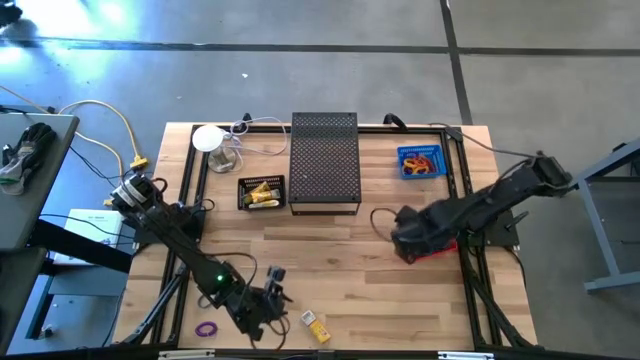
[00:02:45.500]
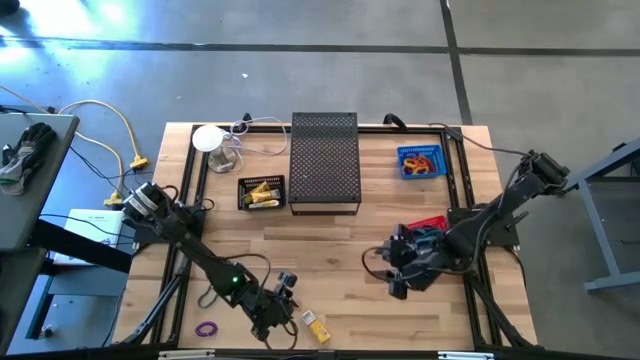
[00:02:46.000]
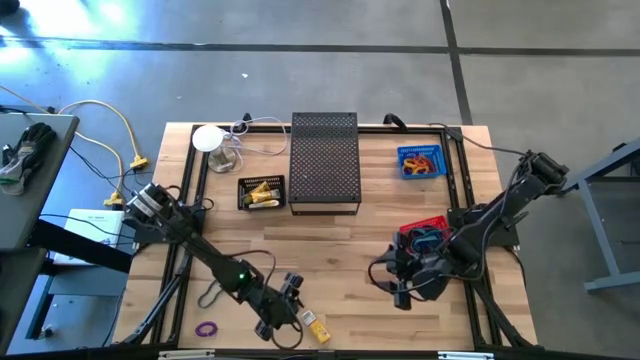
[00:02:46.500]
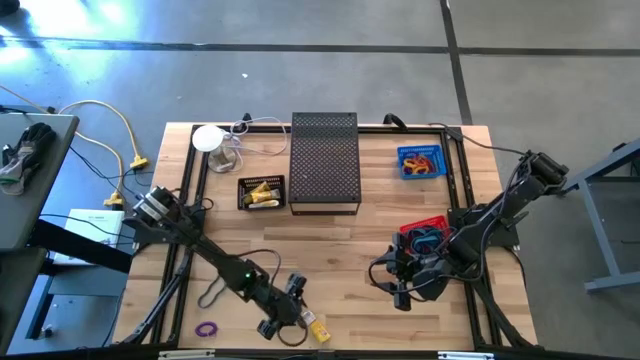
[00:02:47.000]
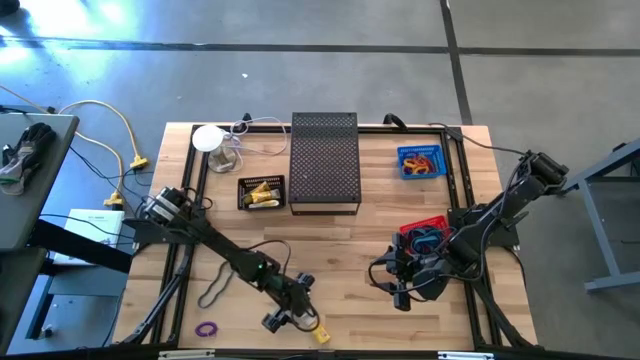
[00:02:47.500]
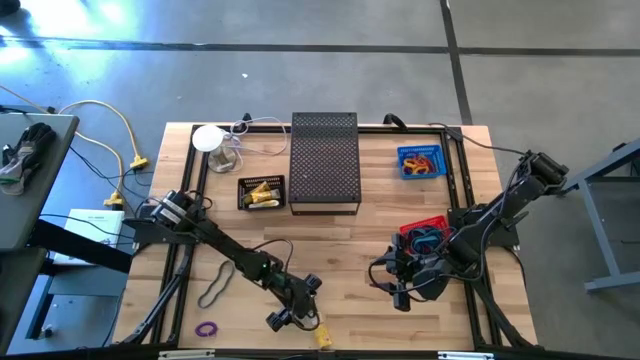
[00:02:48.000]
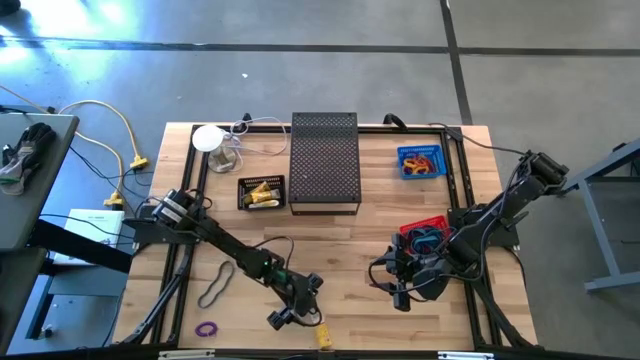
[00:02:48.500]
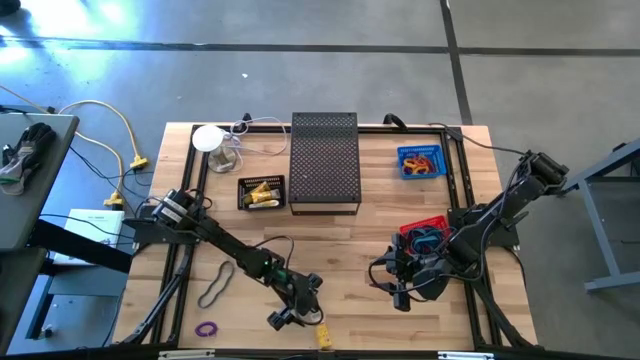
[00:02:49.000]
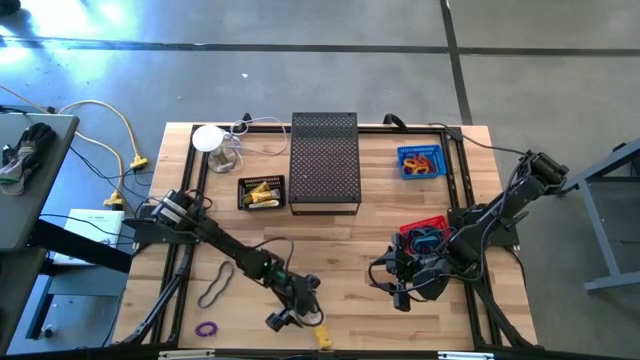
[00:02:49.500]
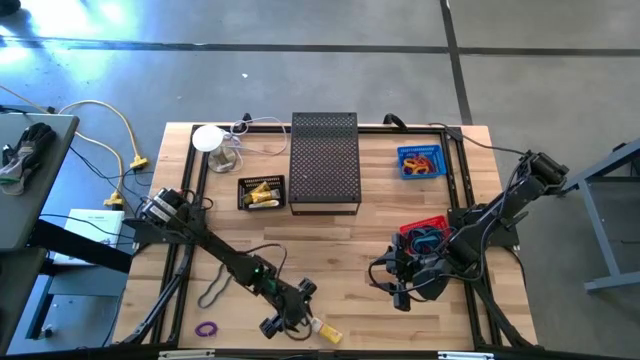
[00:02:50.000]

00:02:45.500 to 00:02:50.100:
Task: Pick & Place Office Desk Supplies
Put the yellow crayon box into the black bin

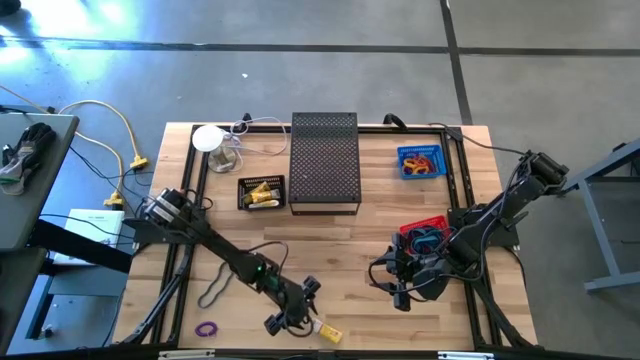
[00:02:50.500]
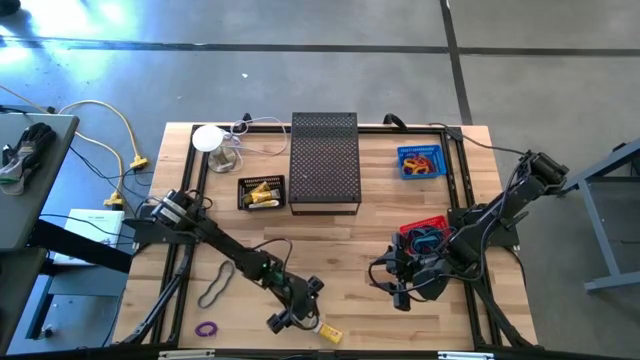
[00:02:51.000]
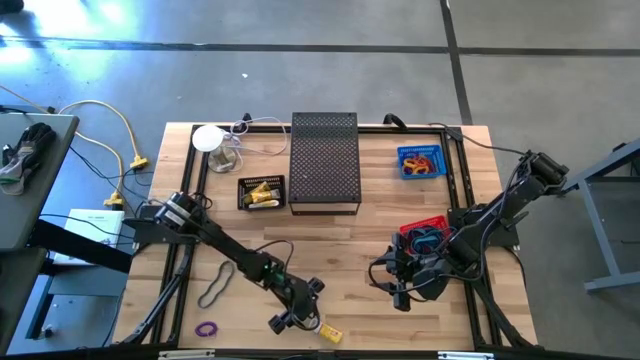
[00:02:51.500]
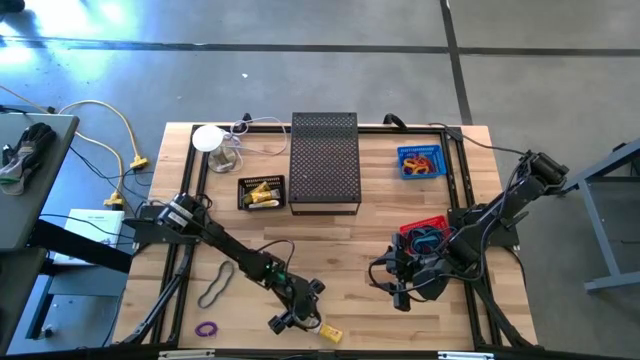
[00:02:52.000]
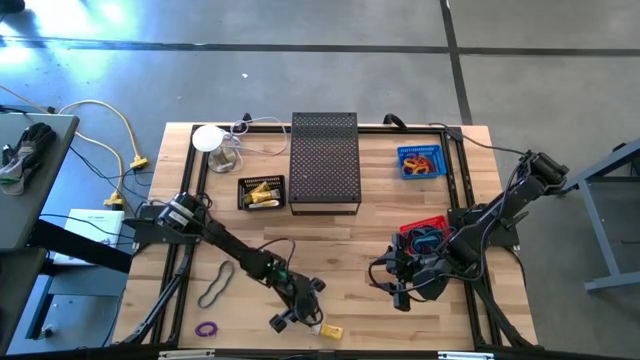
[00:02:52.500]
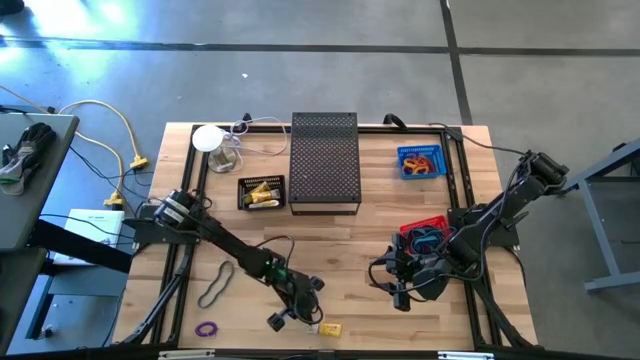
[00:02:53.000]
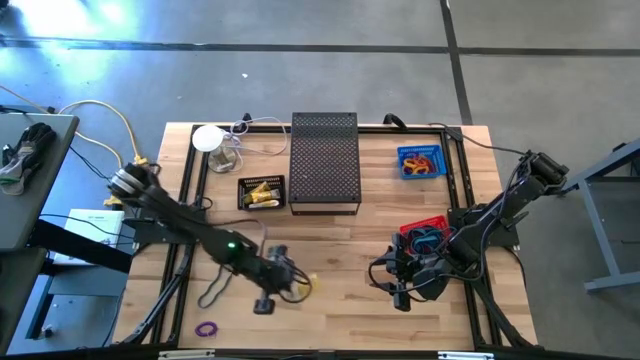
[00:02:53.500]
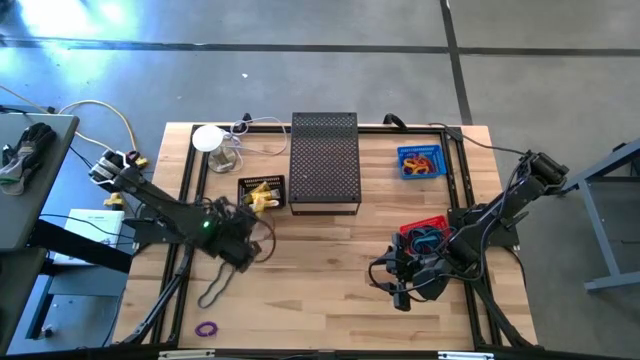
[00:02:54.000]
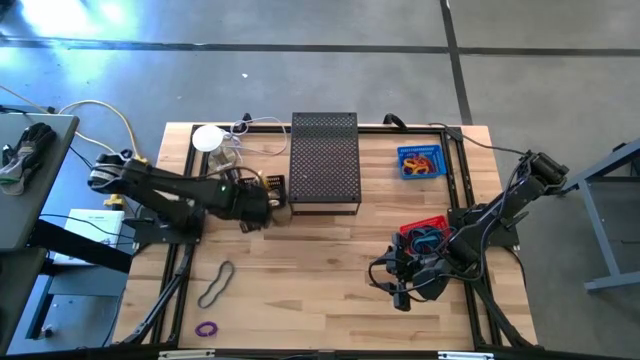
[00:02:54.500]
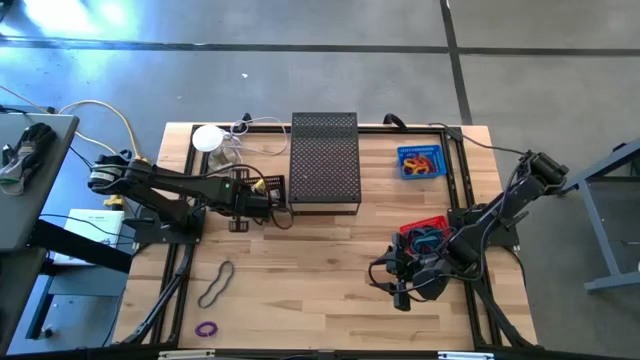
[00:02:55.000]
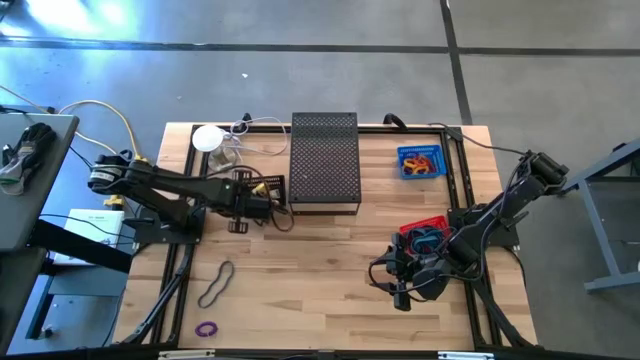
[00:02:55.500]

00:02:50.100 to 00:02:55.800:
Put the yellow crayon box into the black bin

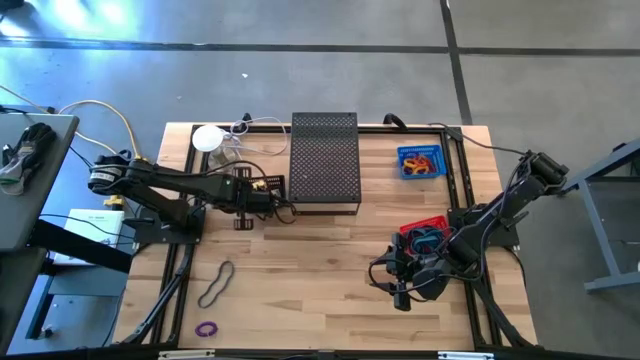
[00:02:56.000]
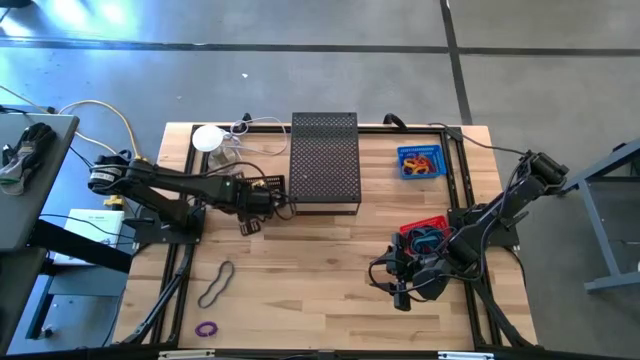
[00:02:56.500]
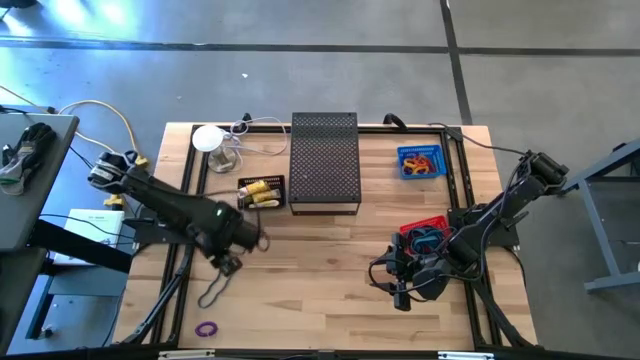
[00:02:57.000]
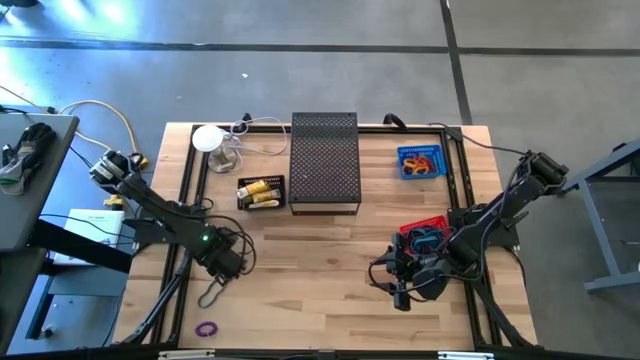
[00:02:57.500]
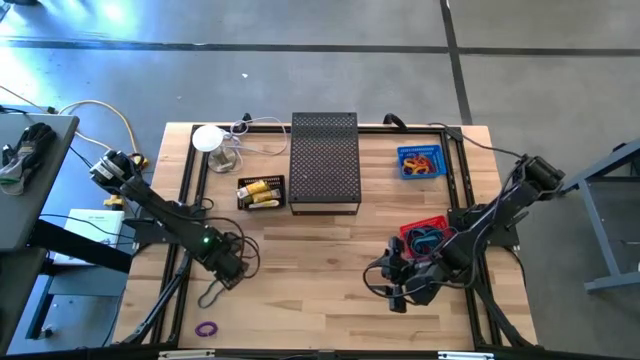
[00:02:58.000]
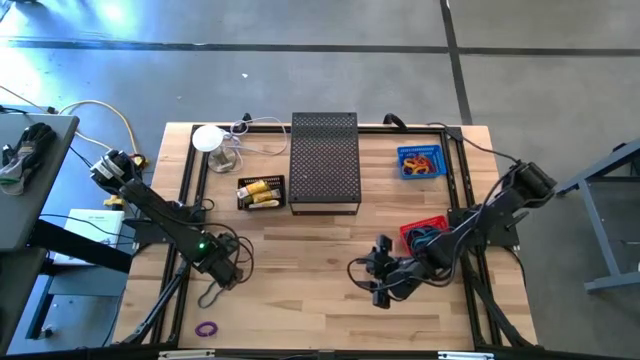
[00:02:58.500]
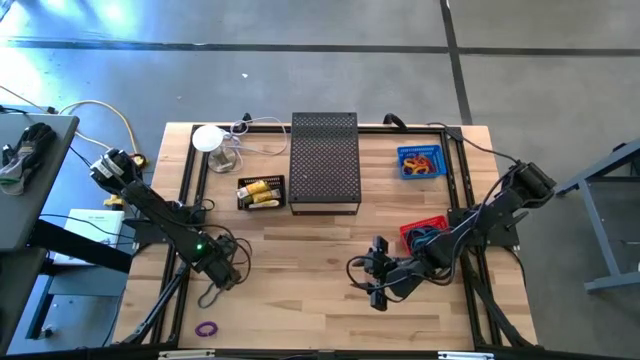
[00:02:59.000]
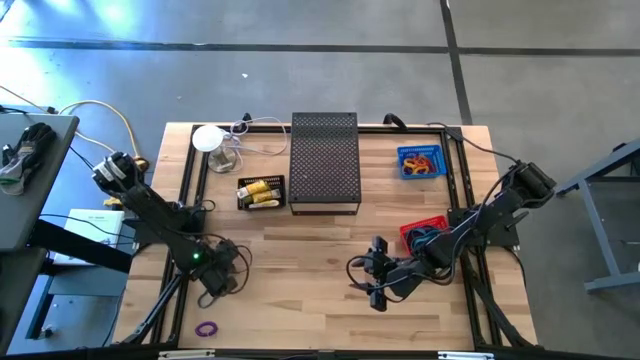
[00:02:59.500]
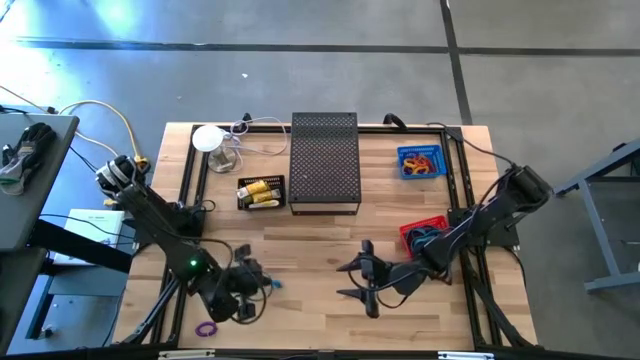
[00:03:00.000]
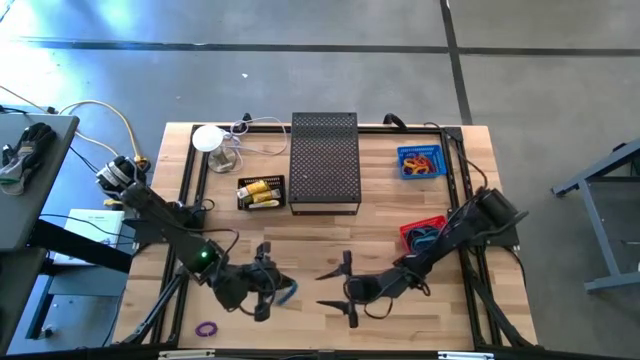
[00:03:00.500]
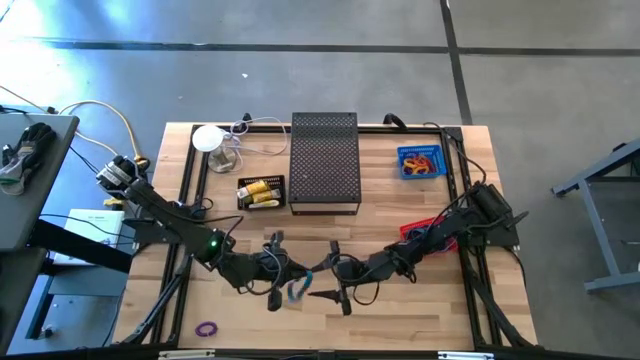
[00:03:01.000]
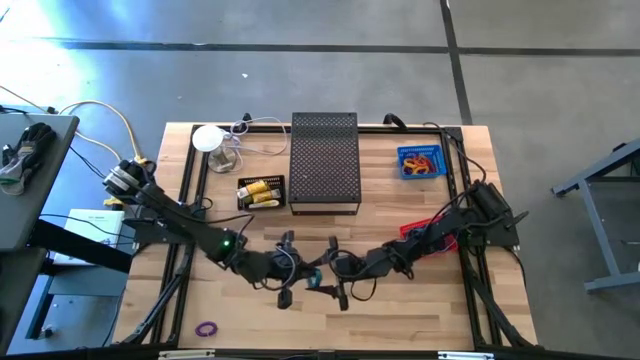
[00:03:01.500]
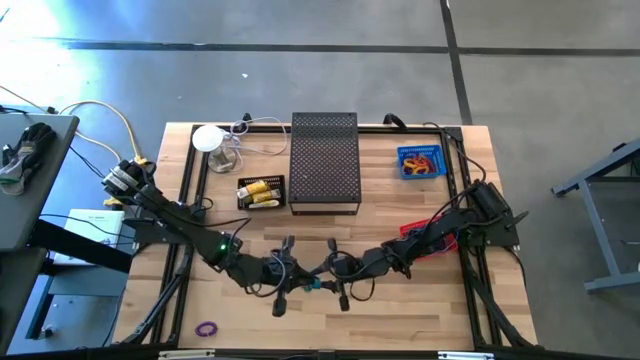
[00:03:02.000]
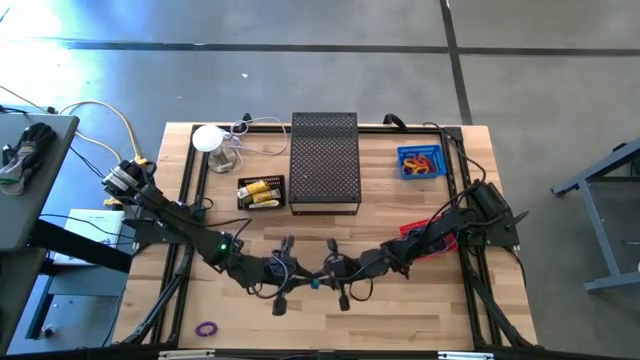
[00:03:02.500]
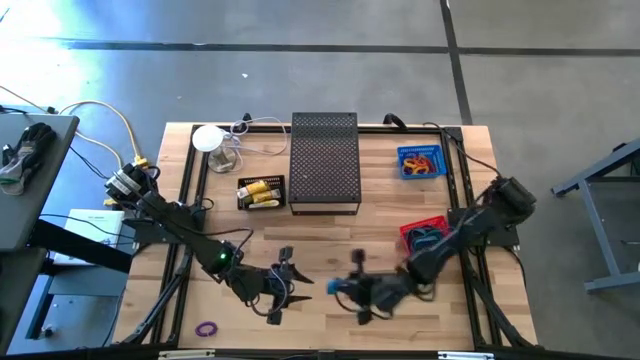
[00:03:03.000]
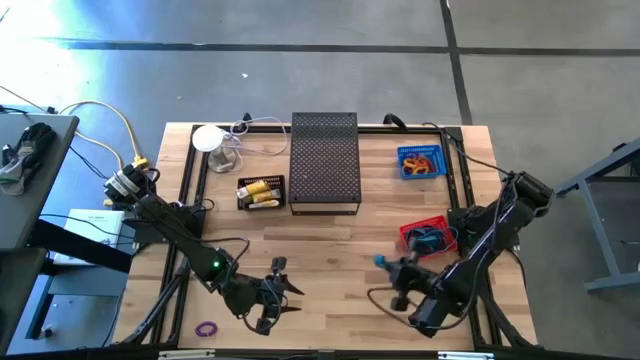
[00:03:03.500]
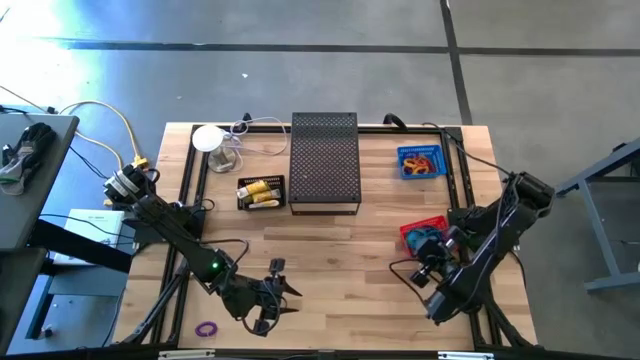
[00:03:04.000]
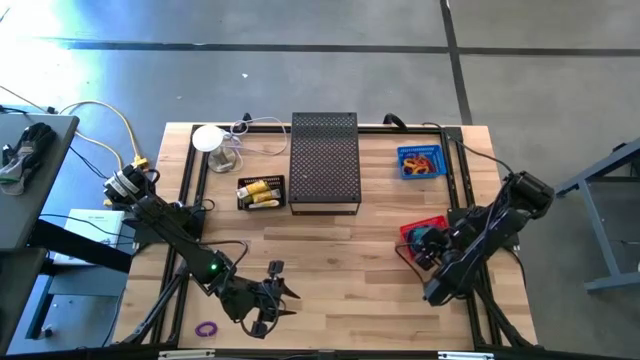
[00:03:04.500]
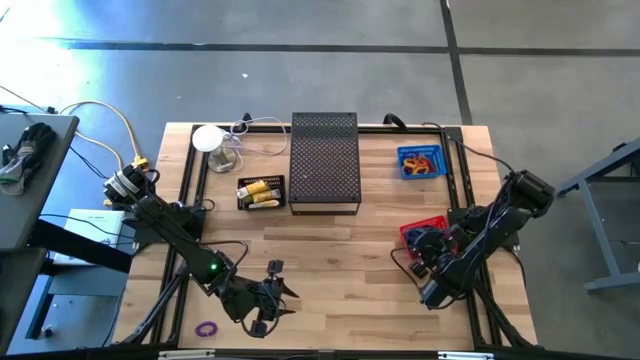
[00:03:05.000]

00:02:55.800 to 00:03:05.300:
Put the blue rubber band into the red bin

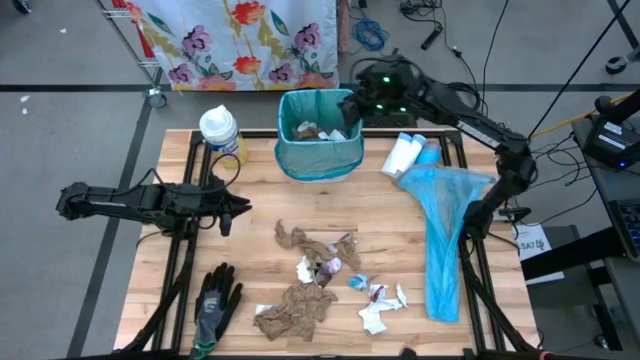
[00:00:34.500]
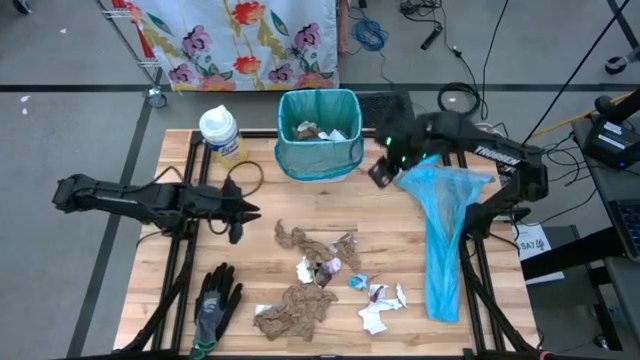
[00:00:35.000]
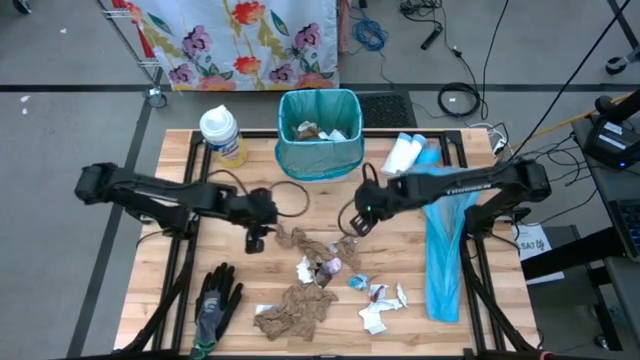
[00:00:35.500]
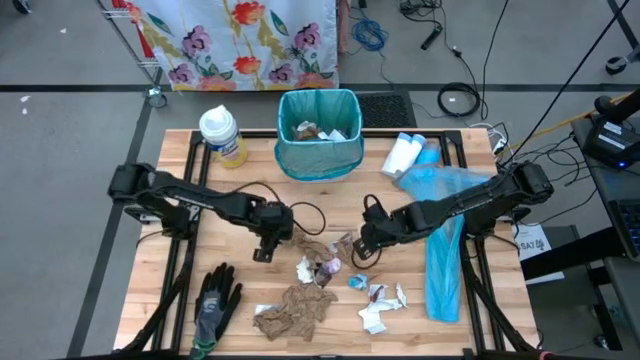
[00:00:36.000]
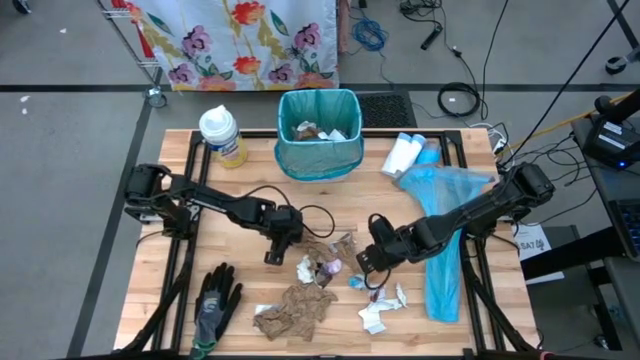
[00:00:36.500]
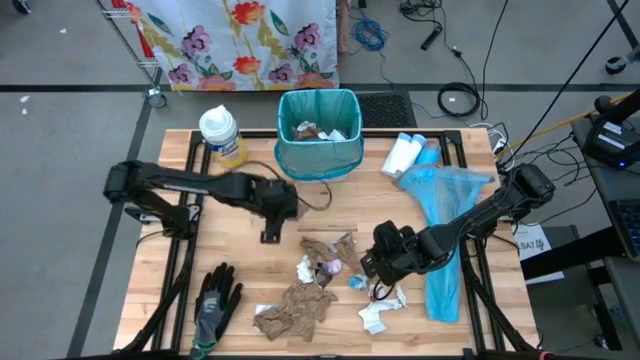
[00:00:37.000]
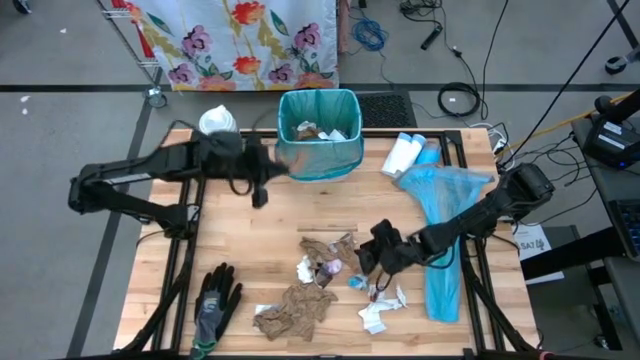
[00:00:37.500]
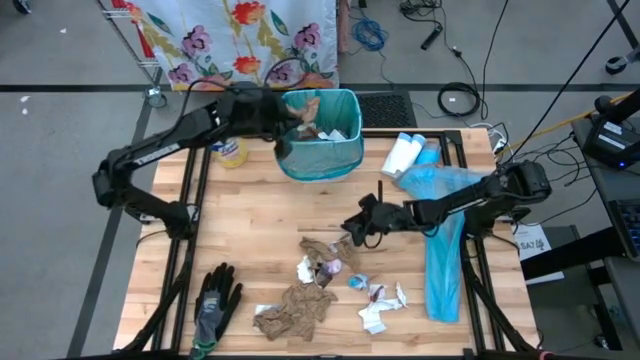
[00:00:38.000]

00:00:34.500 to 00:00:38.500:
Task: place trash/remove bag and relplace
Put the brown napkin into the white trash bin
